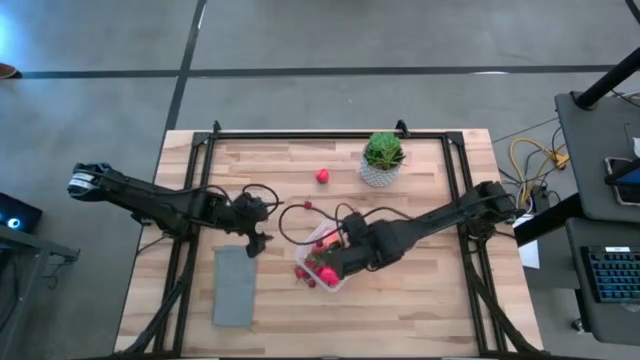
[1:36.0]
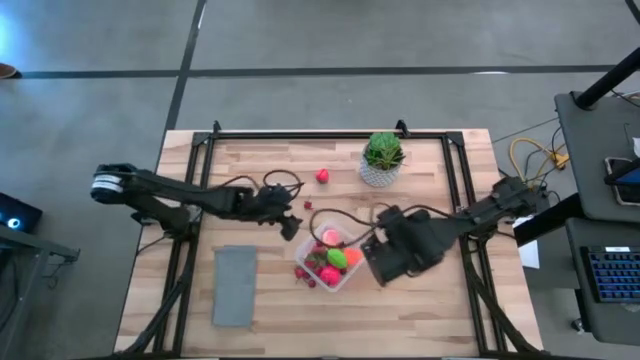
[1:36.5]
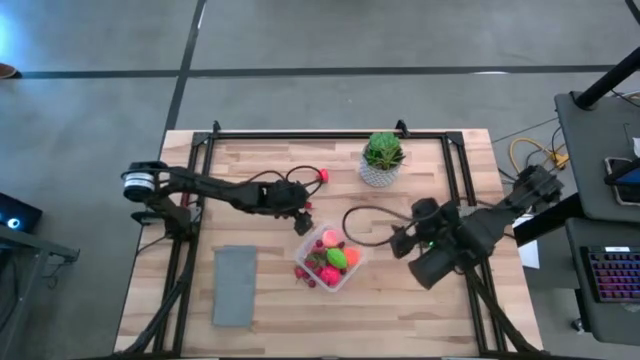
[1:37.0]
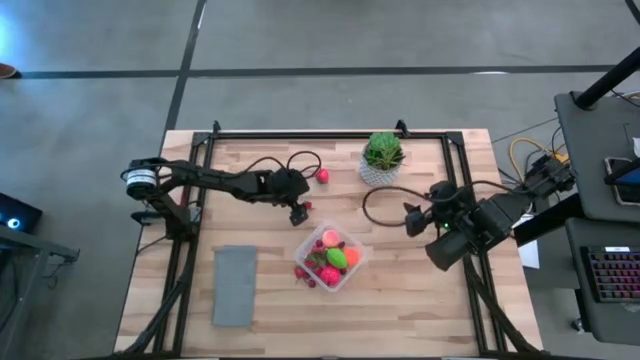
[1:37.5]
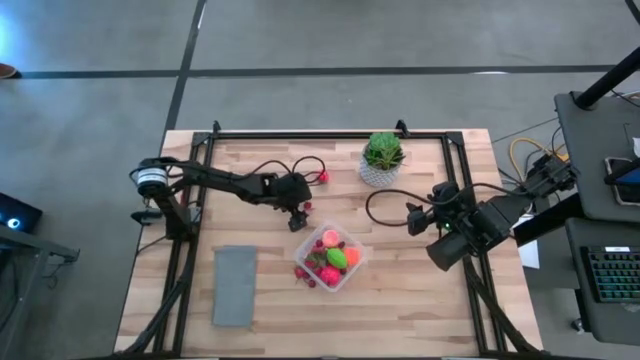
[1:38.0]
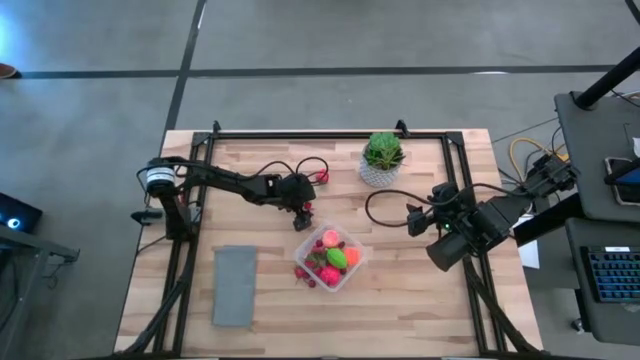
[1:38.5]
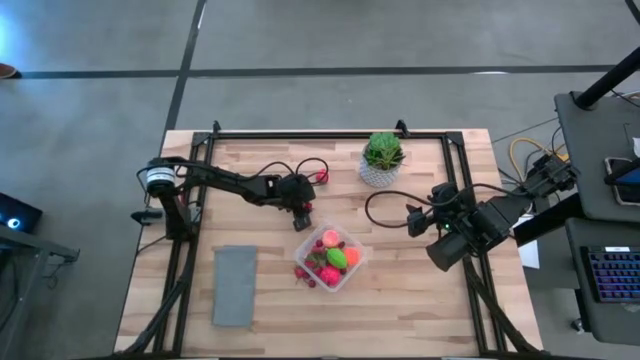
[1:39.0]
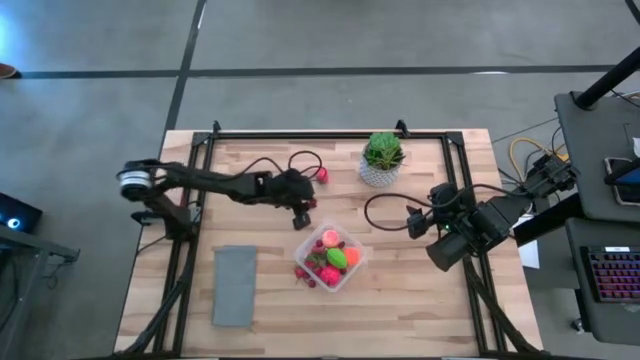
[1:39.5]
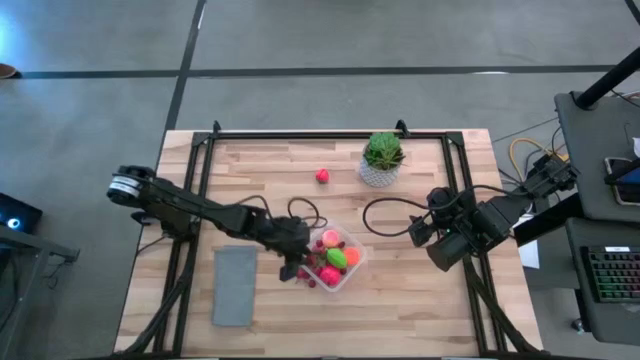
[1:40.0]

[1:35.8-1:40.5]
Task: Pick and placing Produce into tupperware
Put the red cherry into the transparent bin

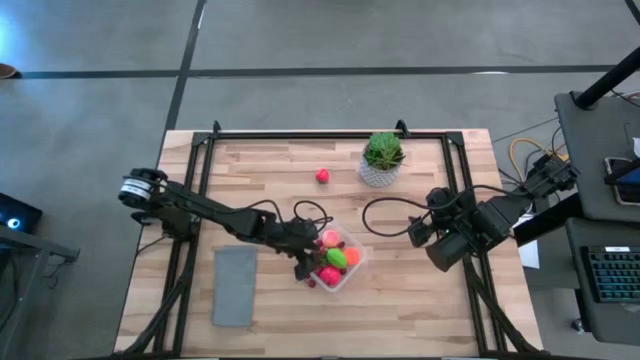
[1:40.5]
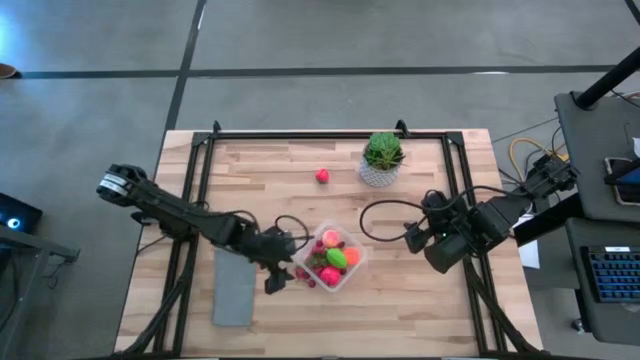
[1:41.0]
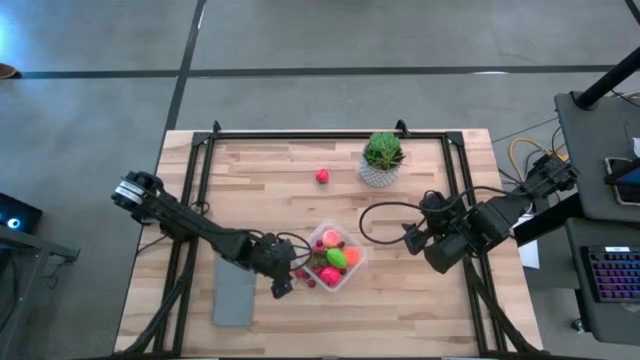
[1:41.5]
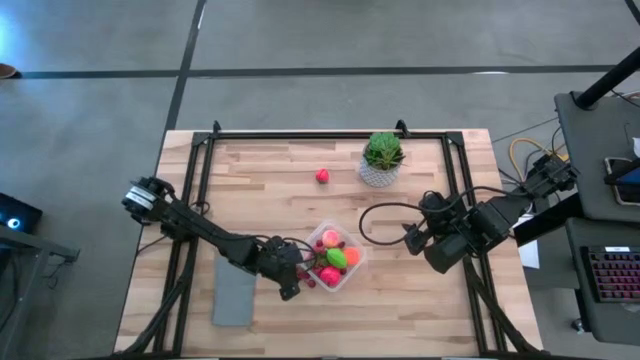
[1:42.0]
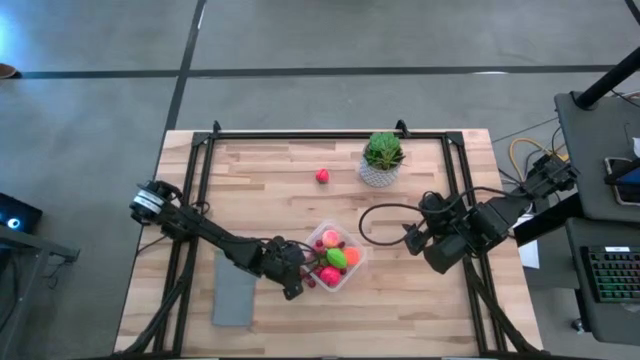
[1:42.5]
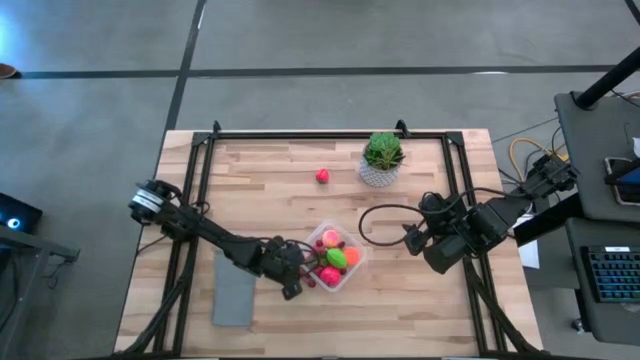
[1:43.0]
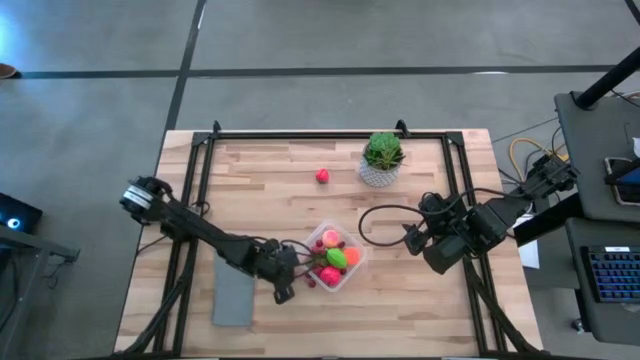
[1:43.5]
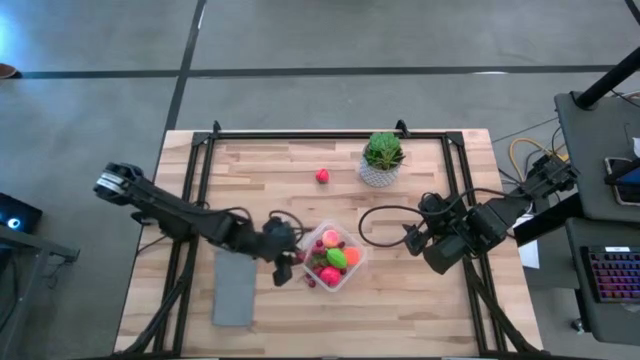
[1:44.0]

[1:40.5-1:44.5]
Put the red strawberry into the transparent bin

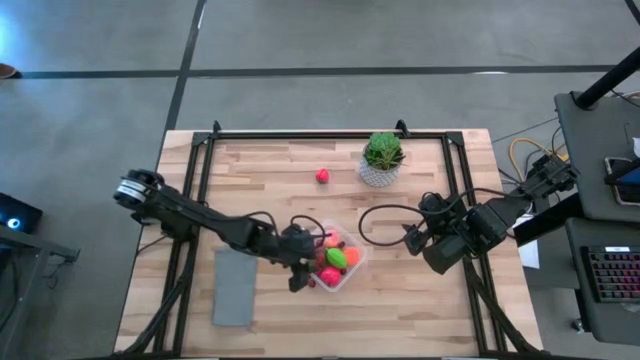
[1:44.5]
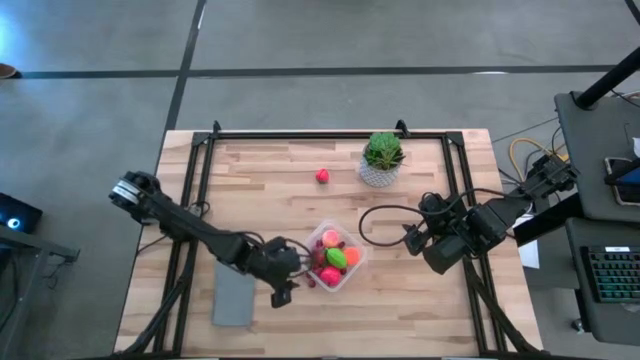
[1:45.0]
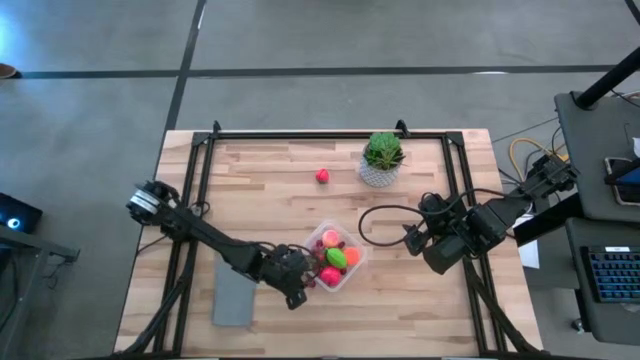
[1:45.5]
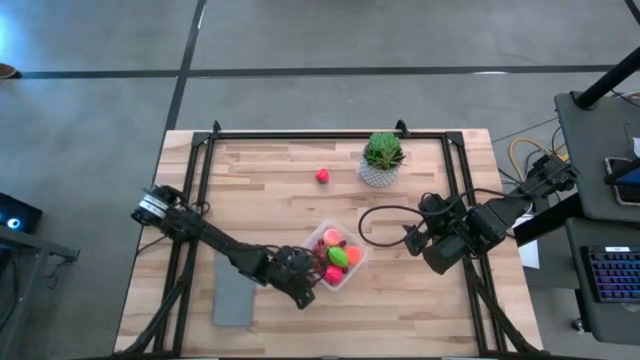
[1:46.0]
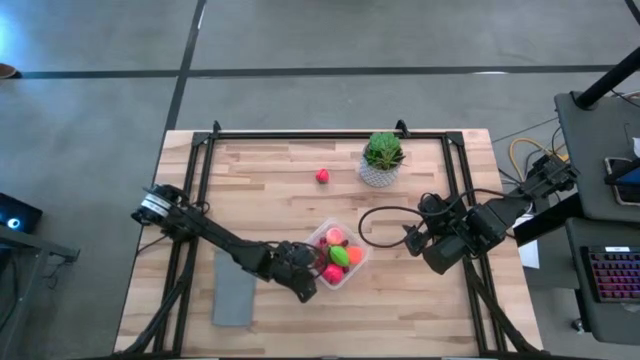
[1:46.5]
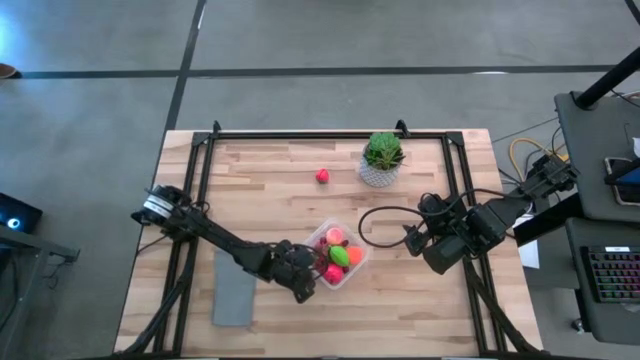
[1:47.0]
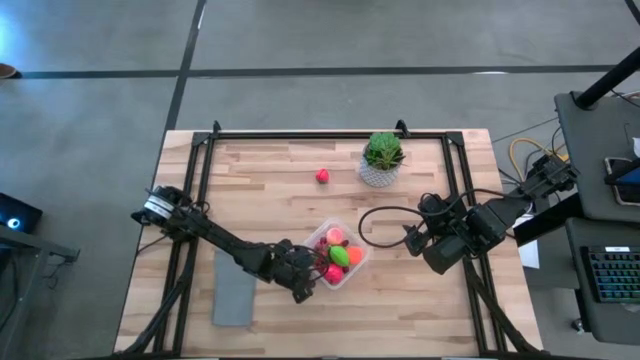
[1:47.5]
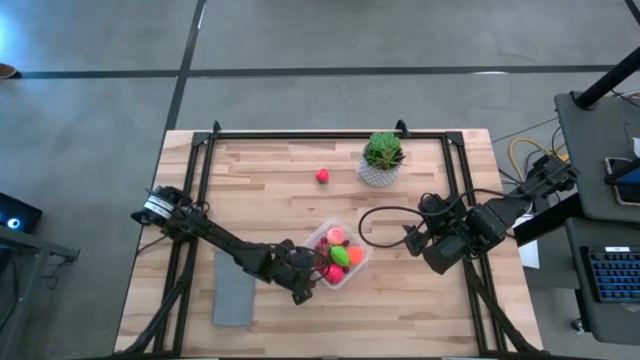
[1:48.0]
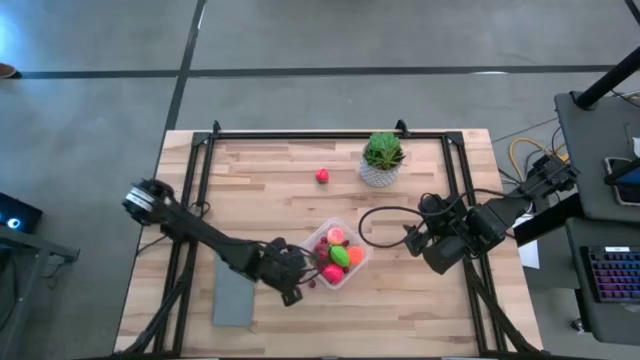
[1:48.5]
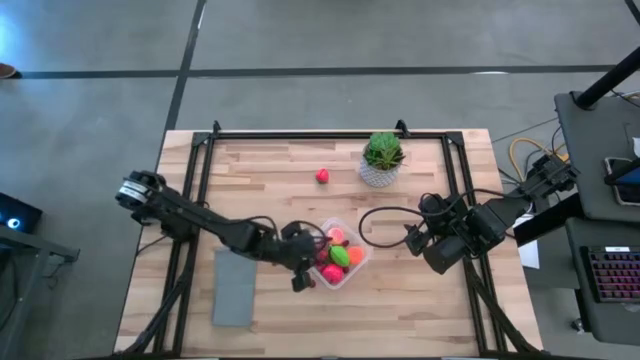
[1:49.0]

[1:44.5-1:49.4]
Put the red cherry into the transparent bin

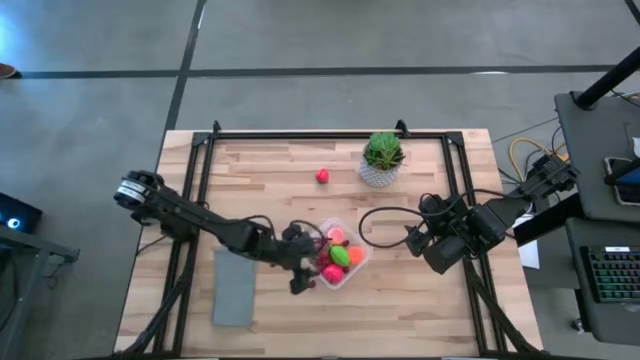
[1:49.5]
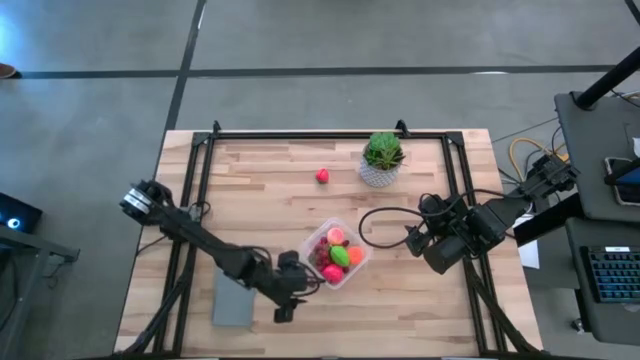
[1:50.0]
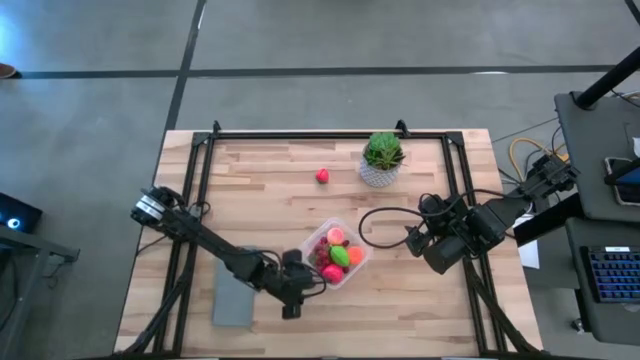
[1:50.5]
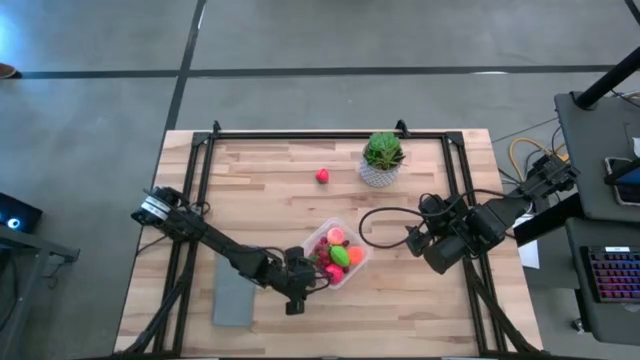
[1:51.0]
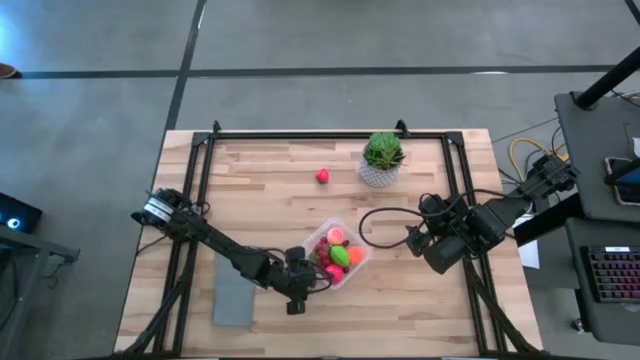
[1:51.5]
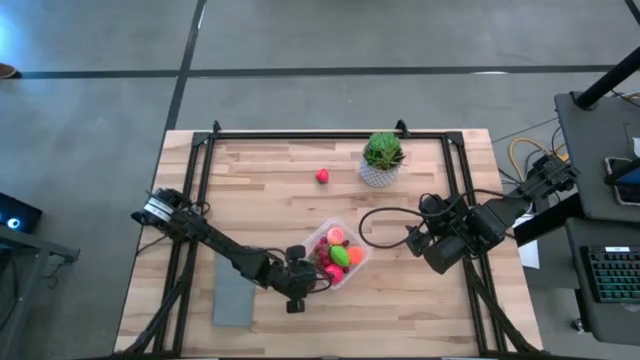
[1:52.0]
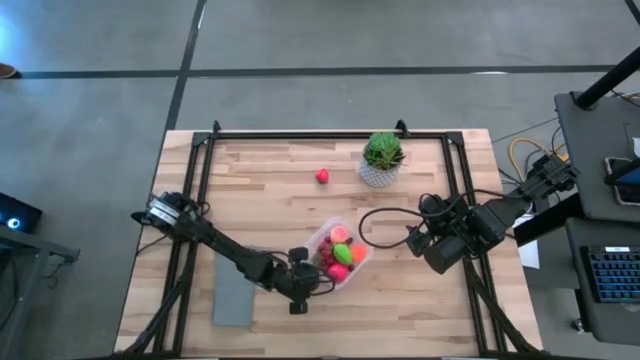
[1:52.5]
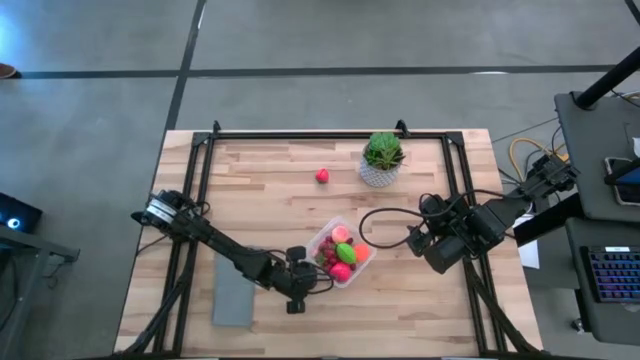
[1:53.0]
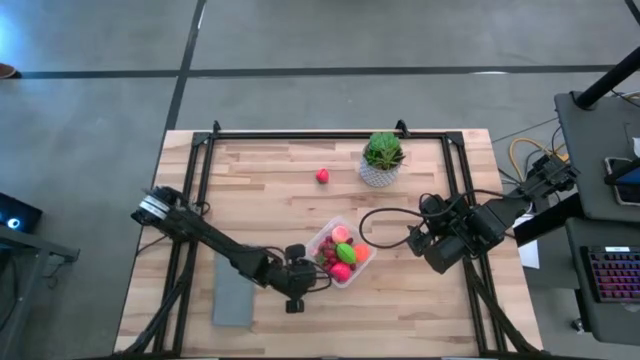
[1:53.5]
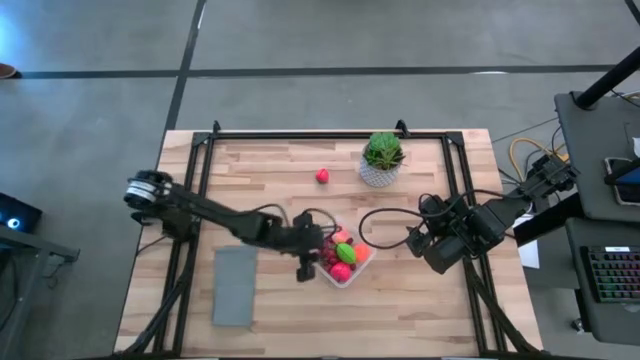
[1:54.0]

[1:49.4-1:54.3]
Put the red cherry into the transparent bin

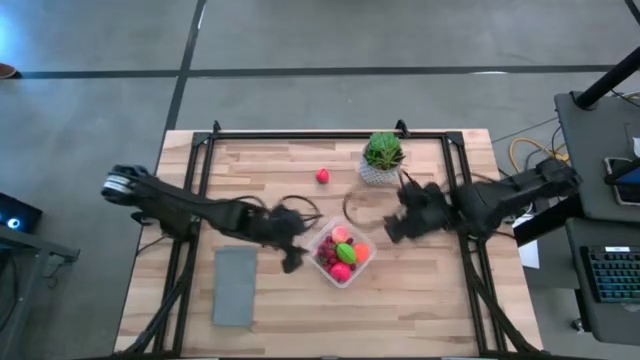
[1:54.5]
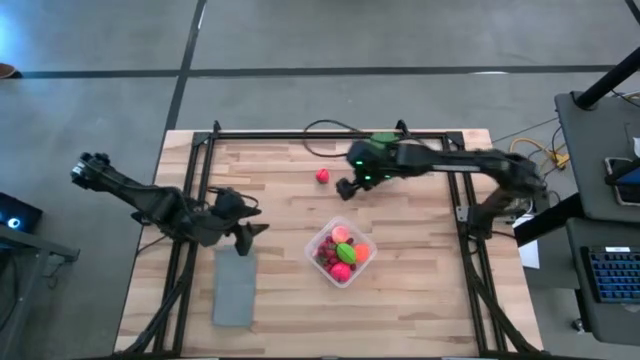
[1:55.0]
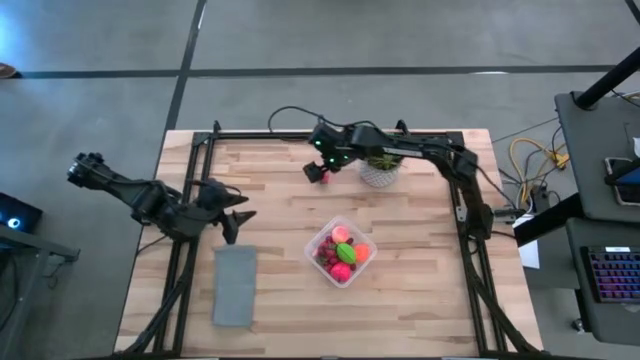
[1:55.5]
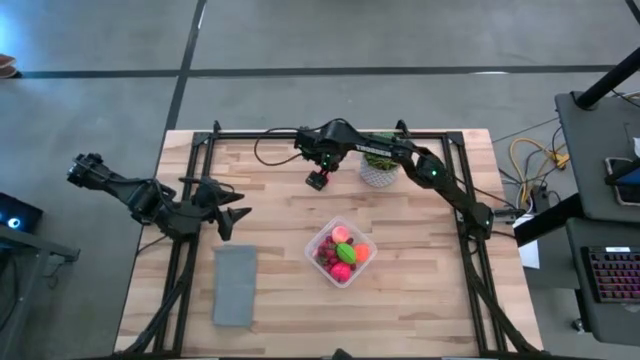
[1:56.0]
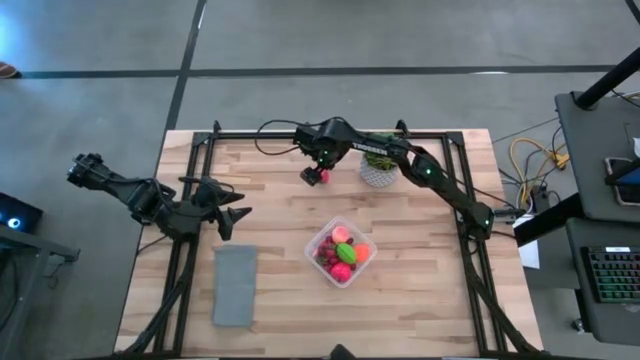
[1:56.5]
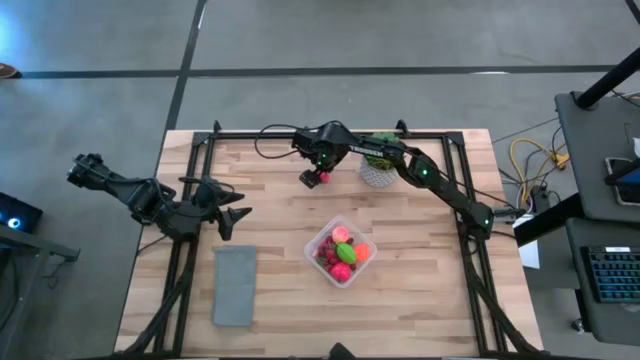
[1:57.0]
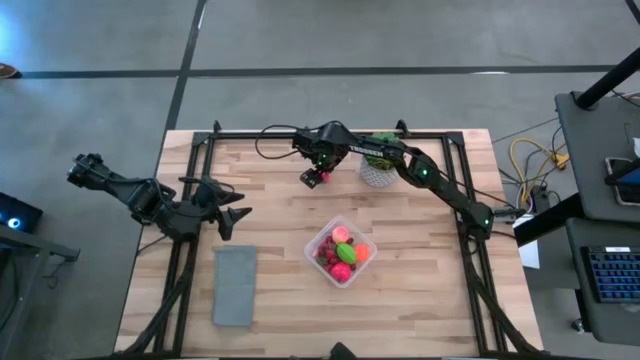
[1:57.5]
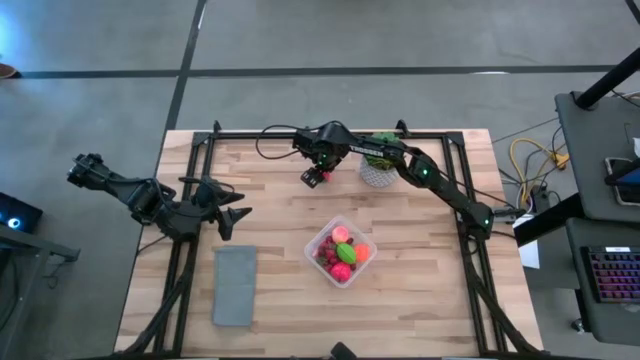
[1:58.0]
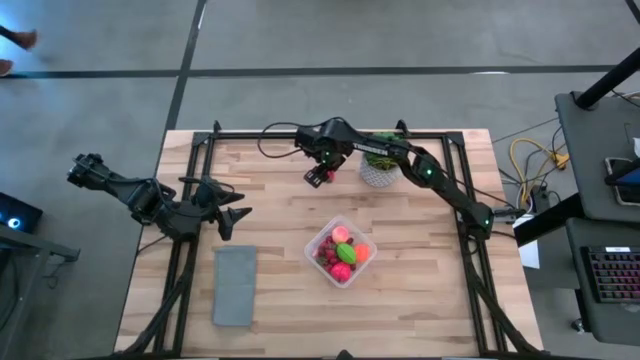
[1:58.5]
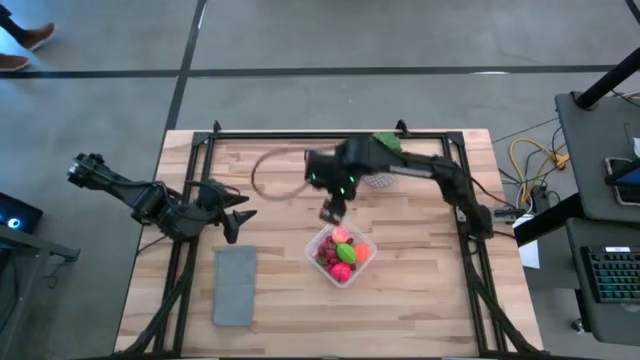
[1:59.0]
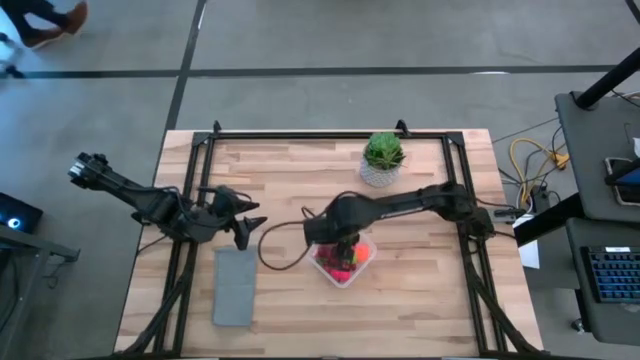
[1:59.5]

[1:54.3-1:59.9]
Put the red strawberry into the transparent bin
